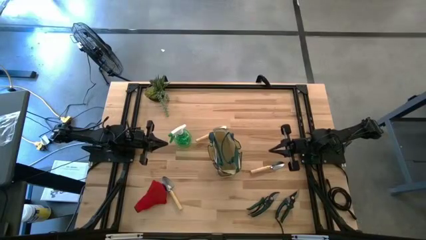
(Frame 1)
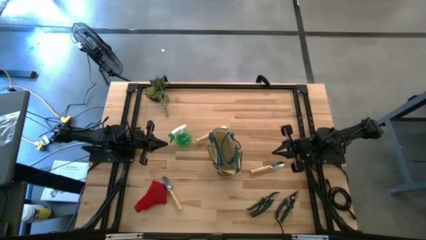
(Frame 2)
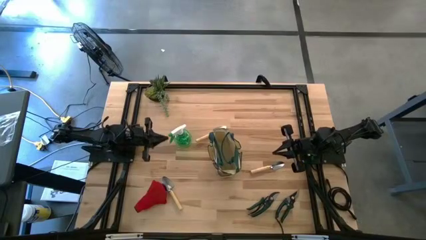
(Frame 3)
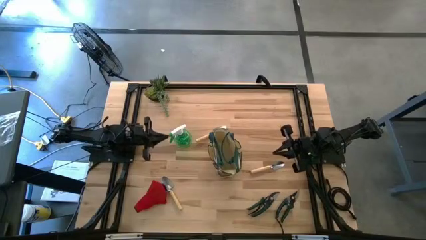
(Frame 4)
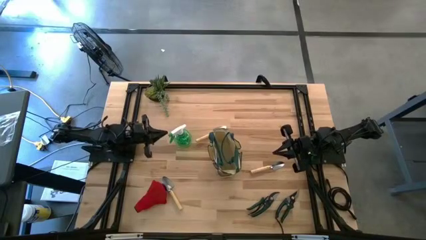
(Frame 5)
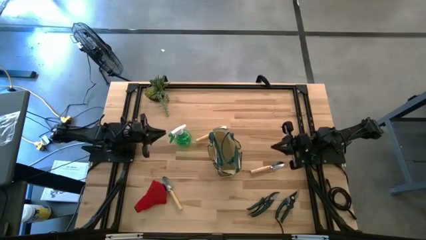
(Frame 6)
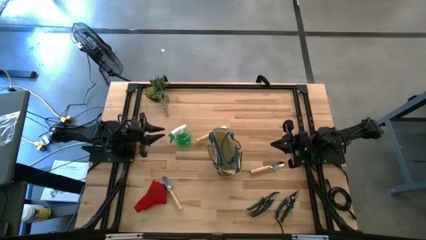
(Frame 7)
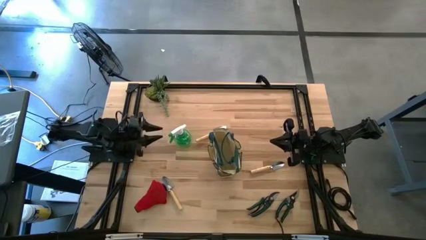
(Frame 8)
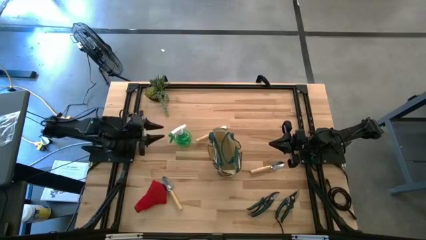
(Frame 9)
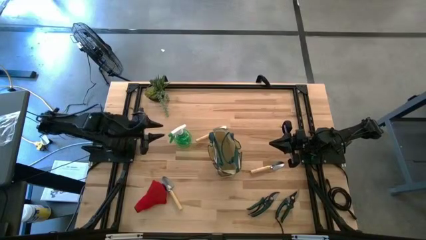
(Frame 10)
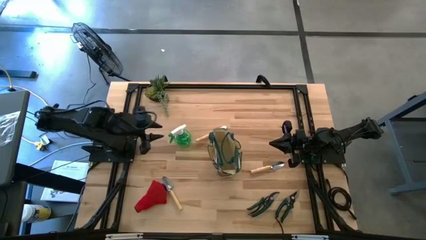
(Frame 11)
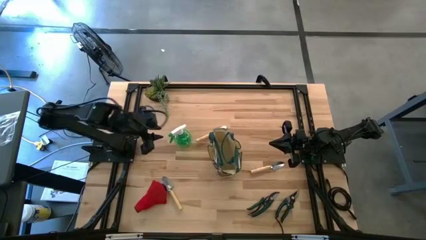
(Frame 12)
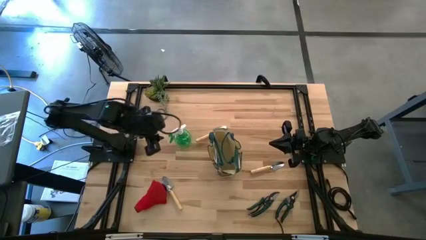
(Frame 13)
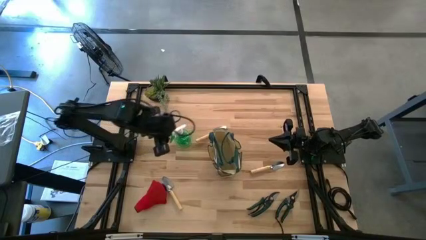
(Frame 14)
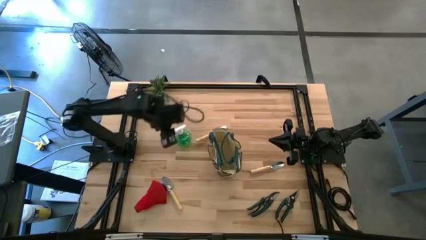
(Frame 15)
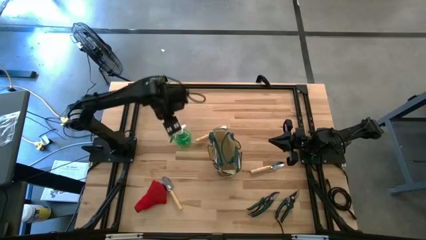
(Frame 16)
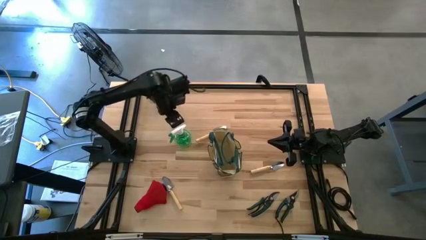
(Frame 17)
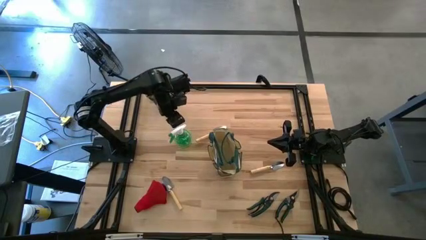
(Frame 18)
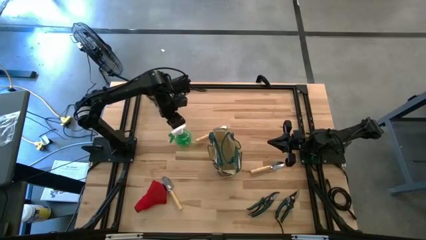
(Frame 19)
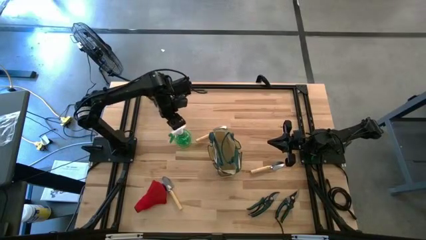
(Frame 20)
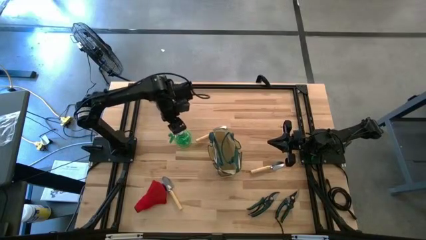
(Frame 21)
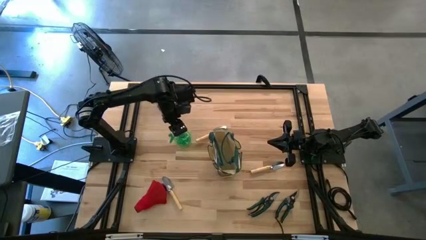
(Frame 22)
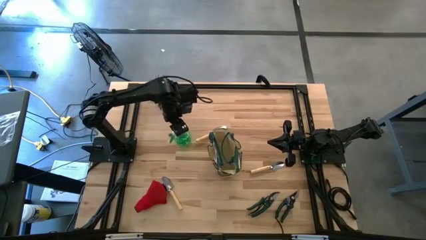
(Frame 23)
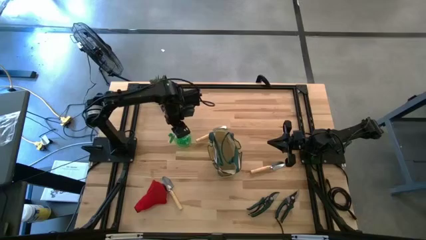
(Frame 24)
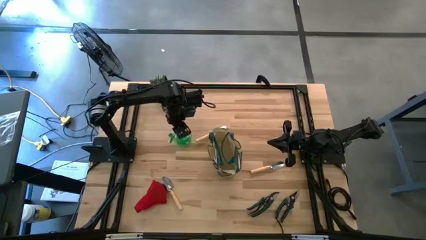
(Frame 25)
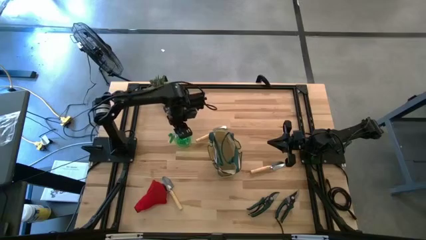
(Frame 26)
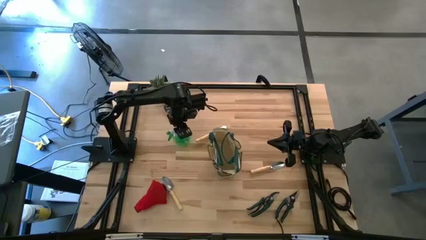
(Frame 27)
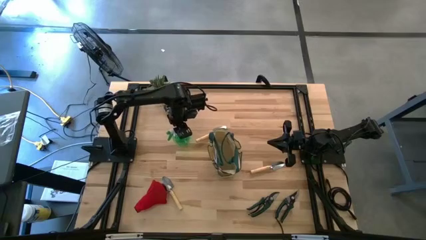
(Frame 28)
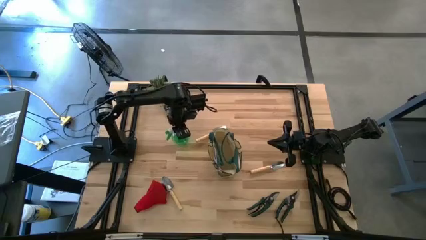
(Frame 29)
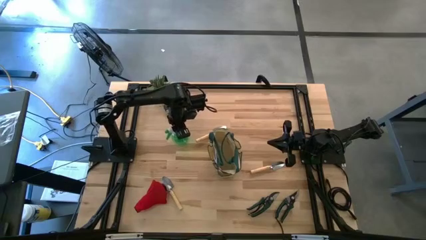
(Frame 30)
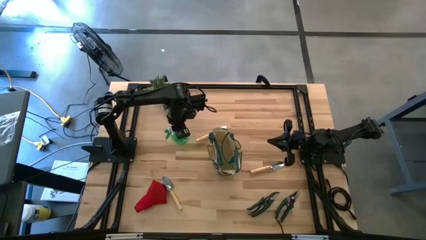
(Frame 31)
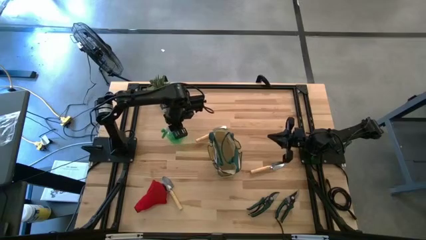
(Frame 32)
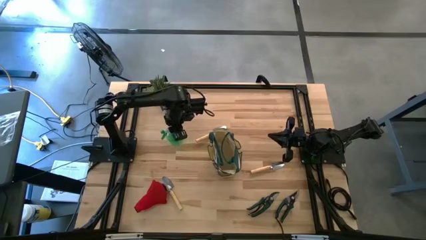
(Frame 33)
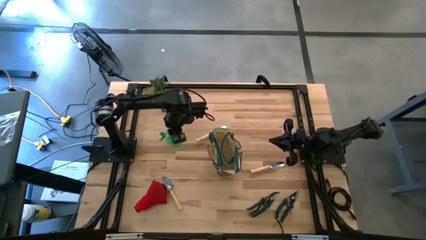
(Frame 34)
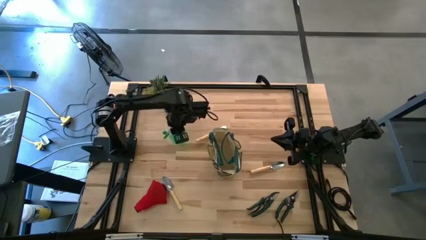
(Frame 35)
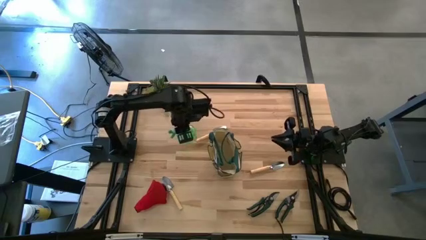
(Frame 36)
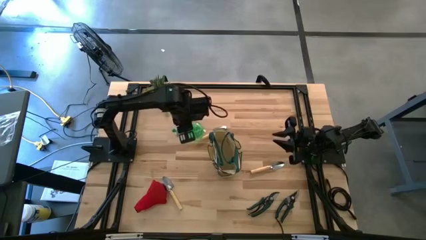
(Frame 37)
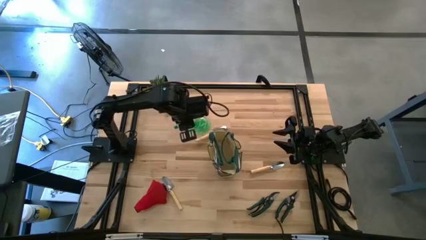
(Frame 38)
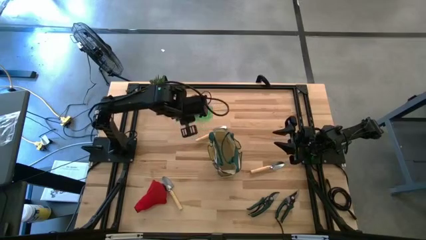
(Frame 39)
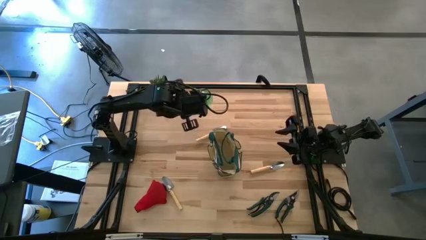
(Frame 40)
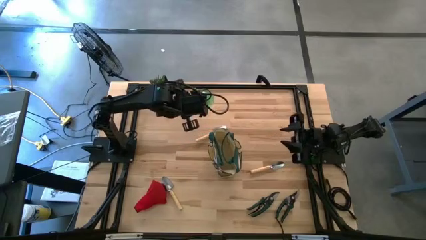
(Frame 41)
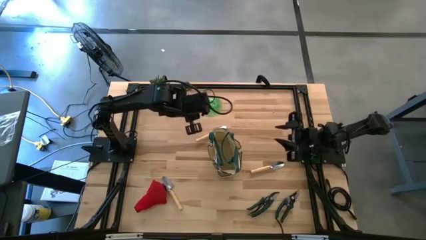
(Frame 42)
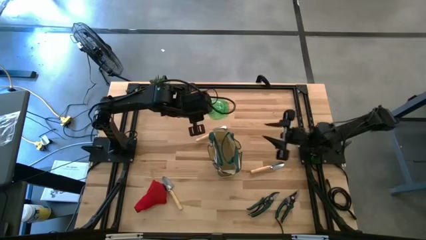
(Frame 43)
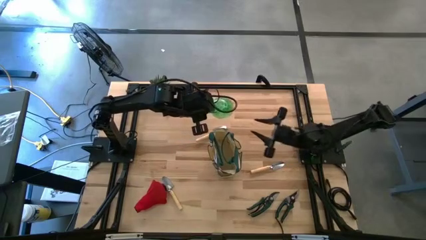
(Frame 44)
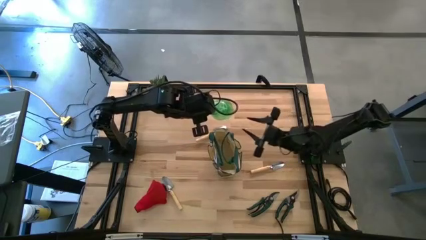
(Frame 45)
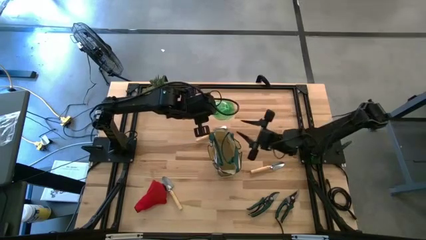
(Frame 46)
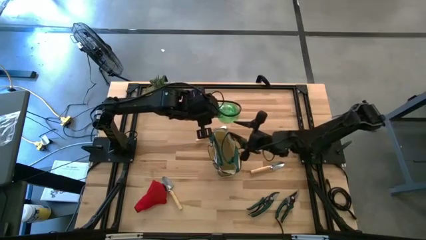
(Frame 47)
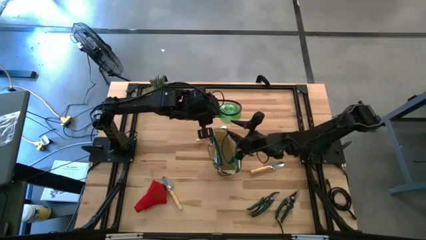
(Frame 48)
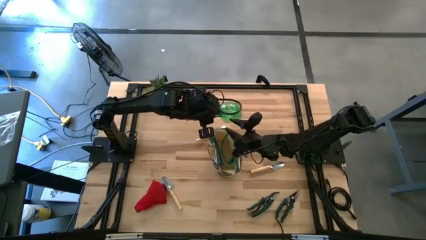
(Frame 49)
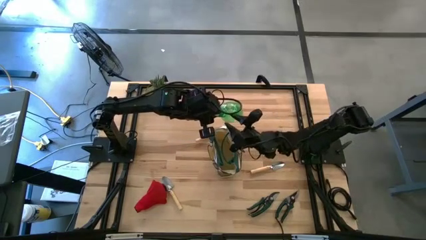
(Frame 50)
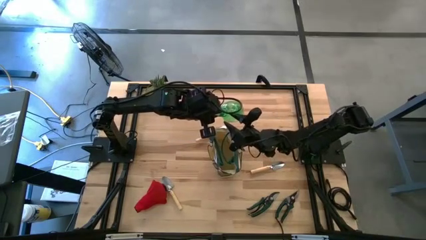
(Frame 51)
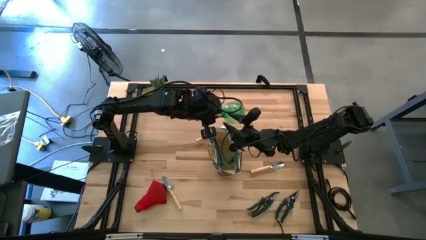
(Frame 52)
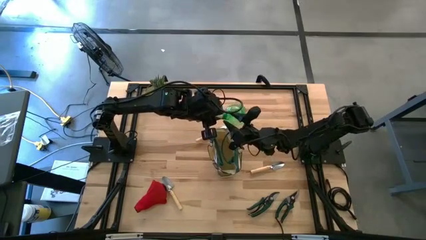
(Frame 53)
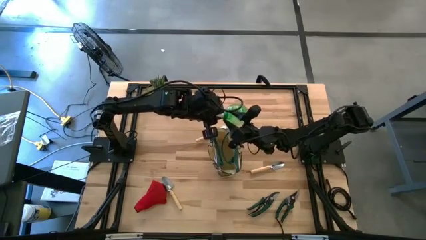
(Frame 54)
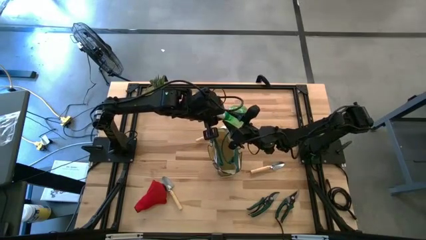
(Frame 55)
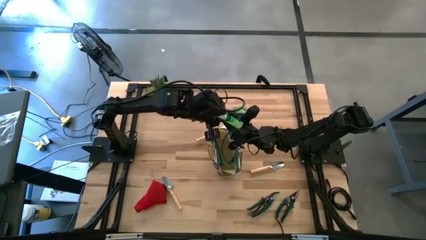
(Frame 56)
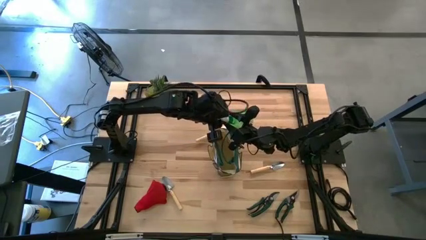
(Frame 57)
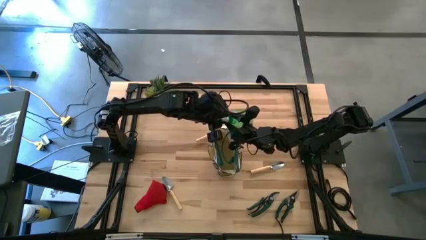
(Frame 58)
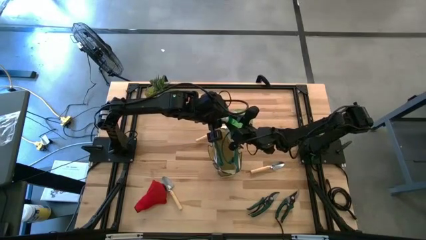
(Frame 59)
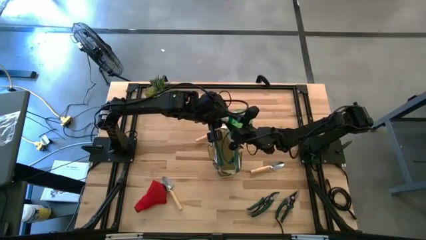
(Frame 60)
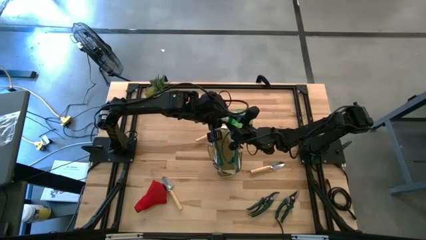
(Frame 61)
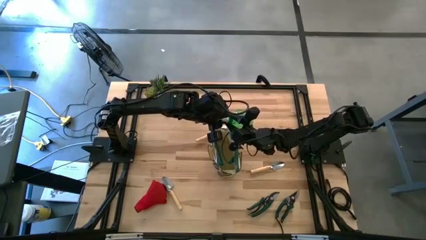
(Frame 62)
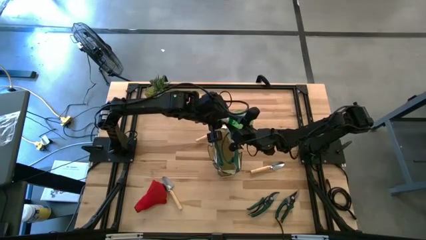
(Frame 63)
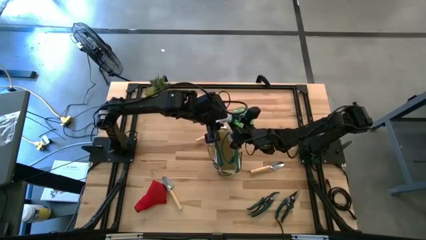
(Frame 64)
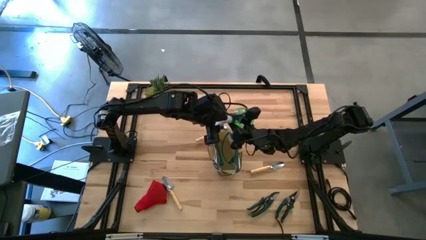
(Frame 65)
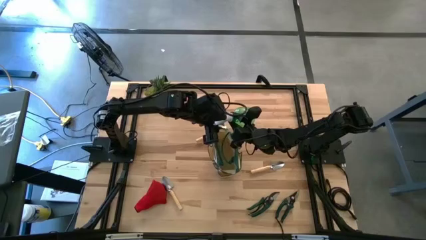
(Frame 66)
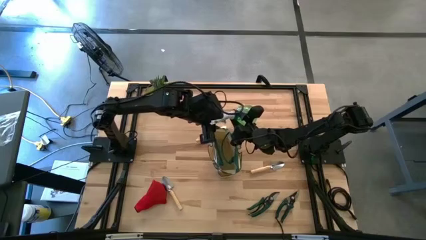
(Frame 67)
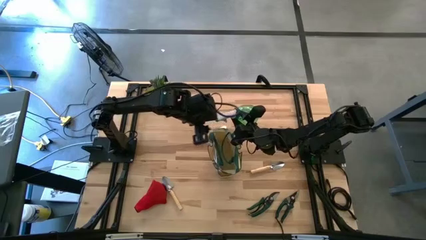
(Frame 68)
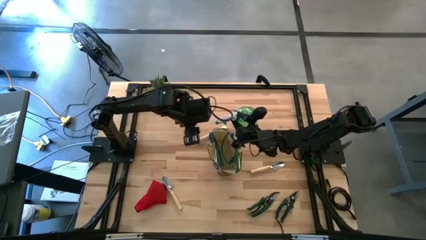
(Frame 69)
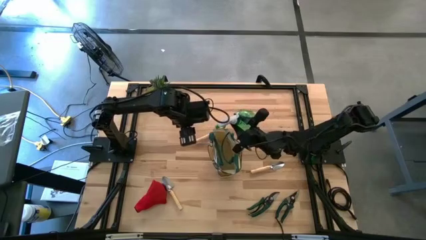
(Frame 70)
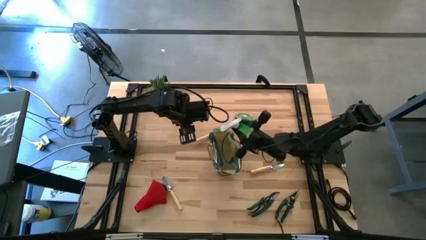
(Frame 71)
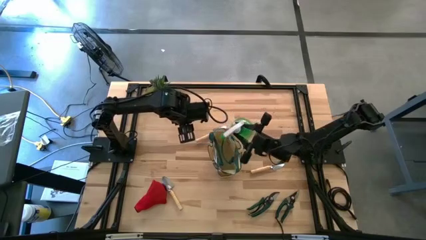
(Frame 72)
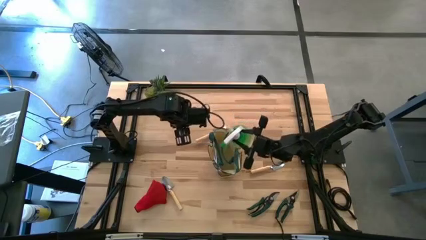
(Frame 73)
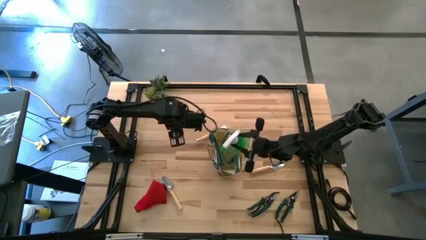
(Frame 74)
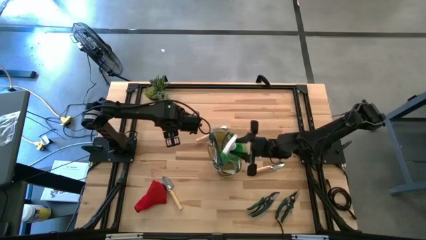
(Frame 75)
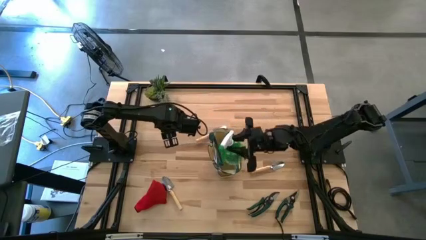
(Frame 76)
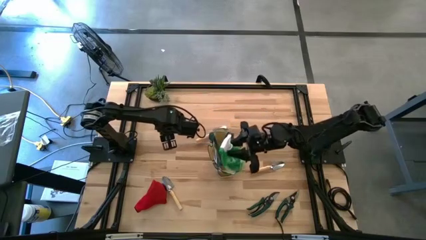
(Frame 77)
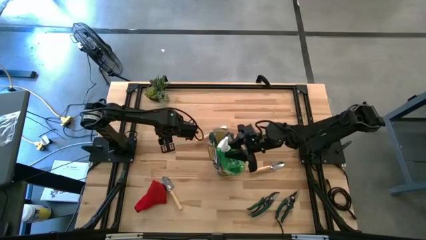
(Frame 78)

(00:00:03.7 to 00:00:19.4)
Task: Pick & Place Garden tools in Gardening bag
Put the green spray bottle into the light brown gardening bag
